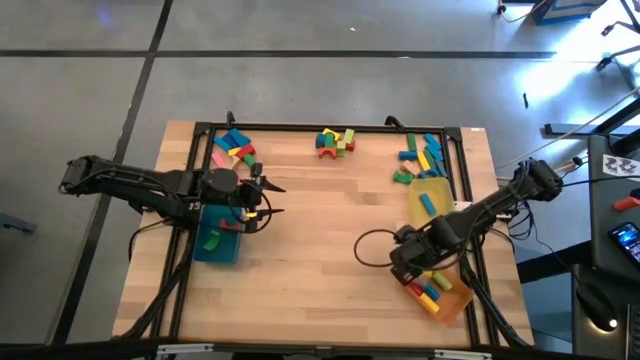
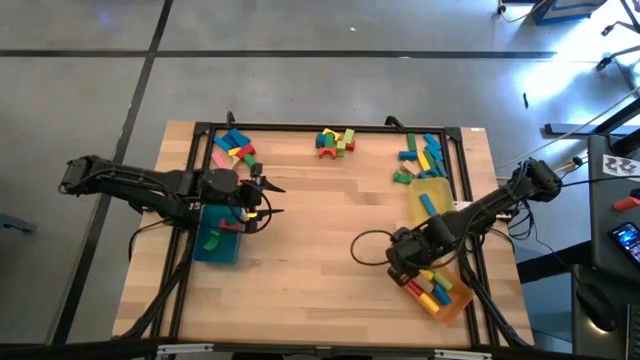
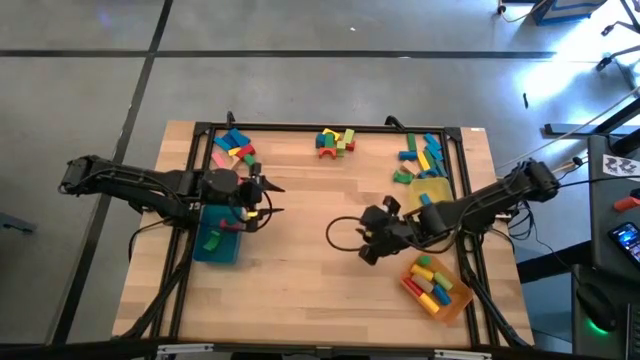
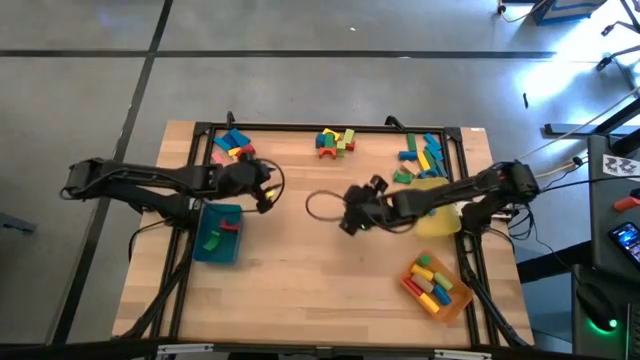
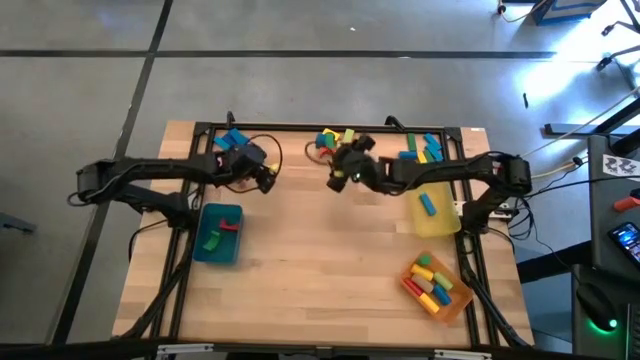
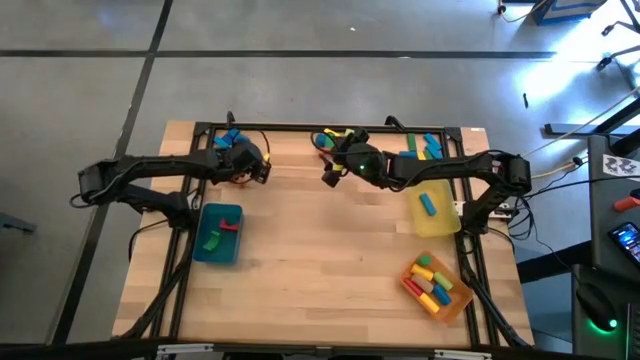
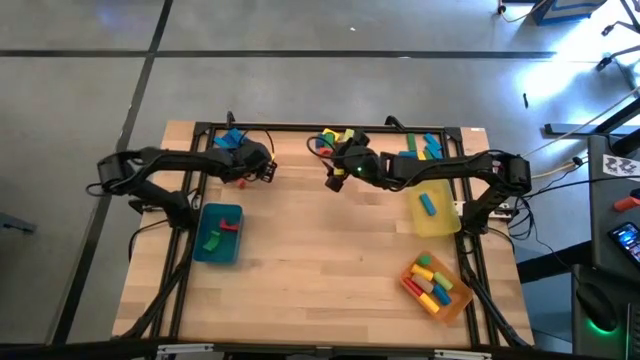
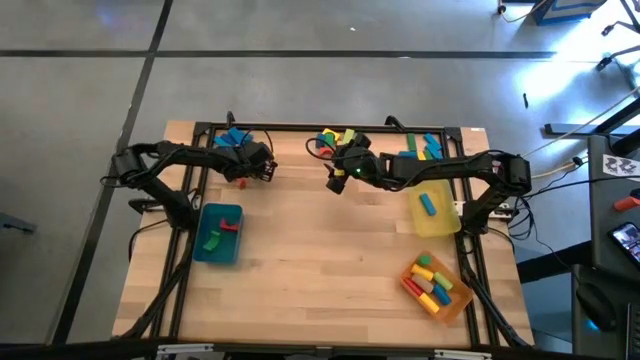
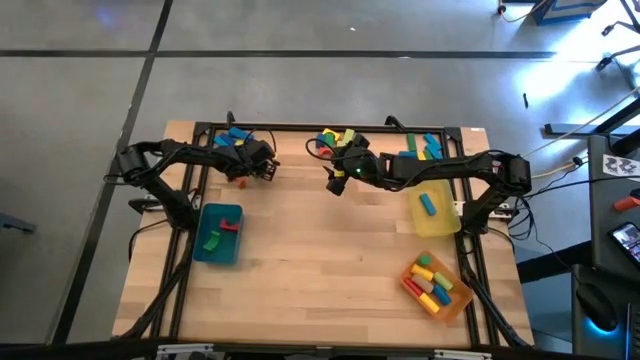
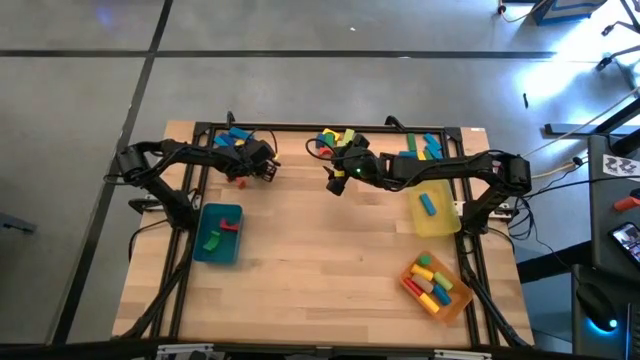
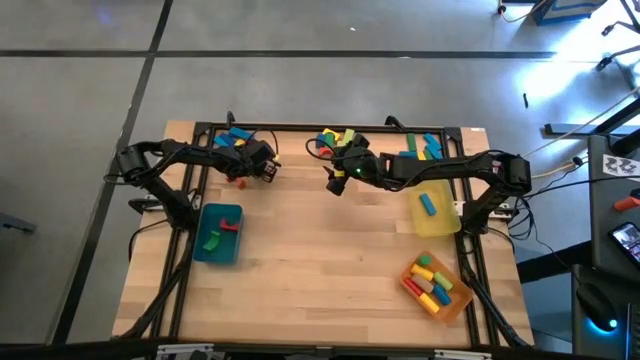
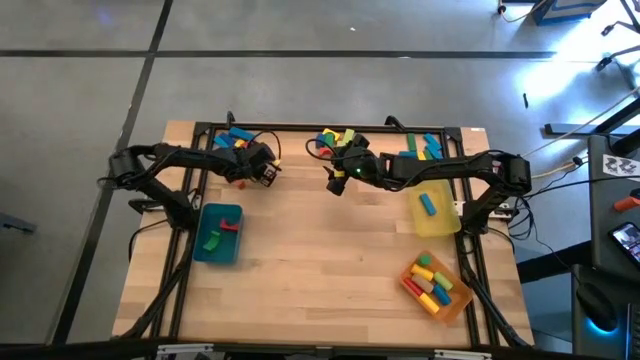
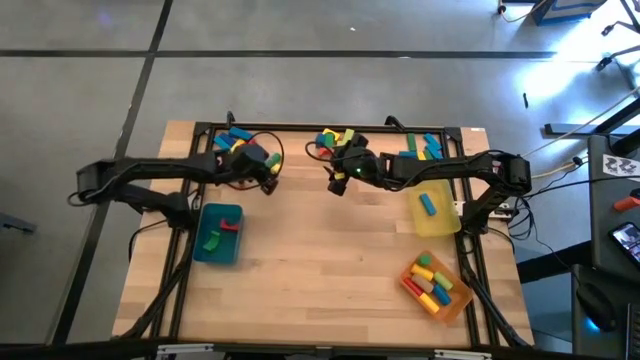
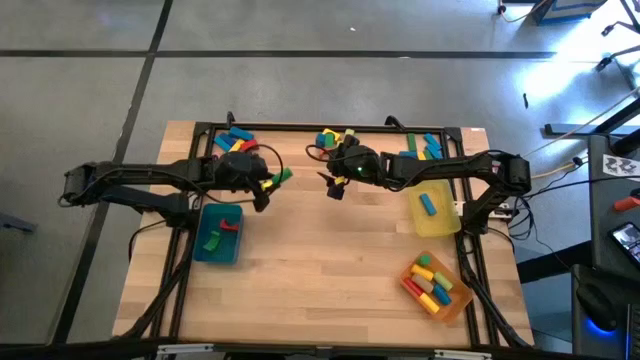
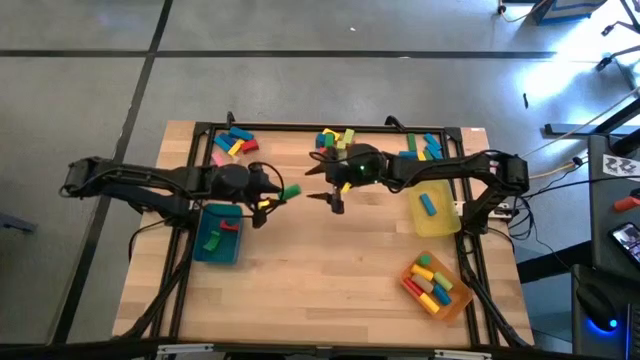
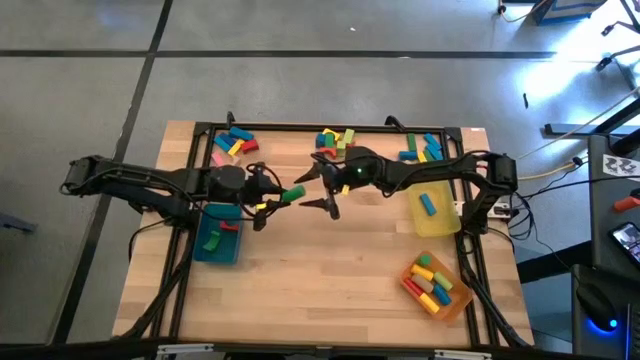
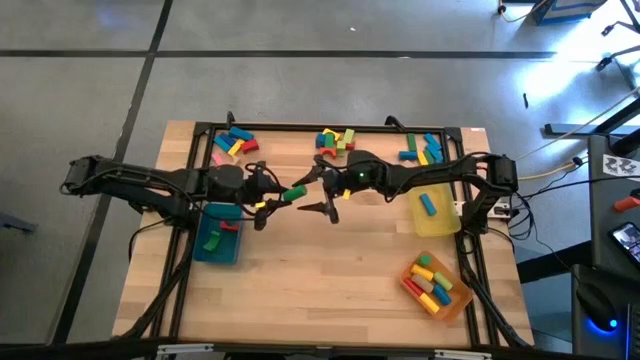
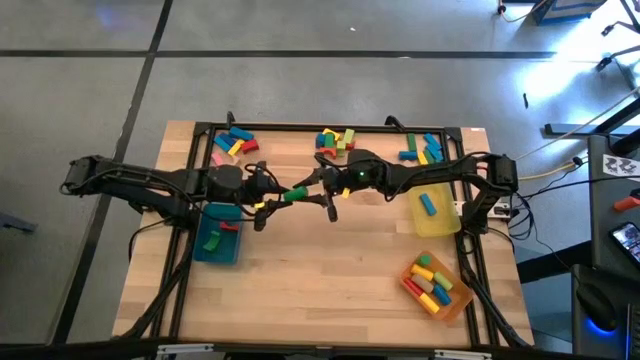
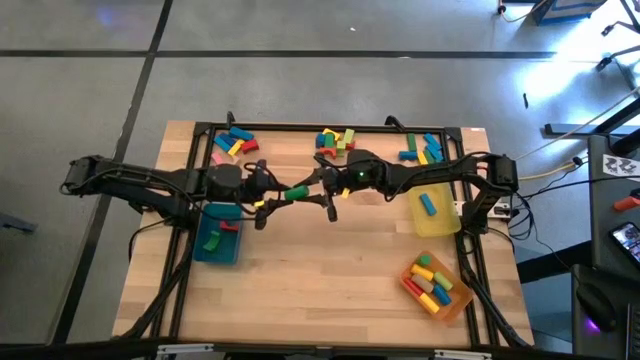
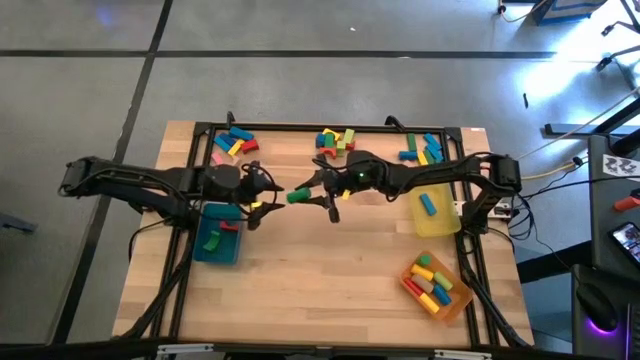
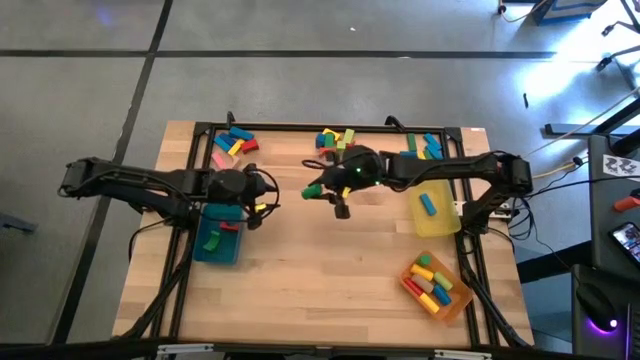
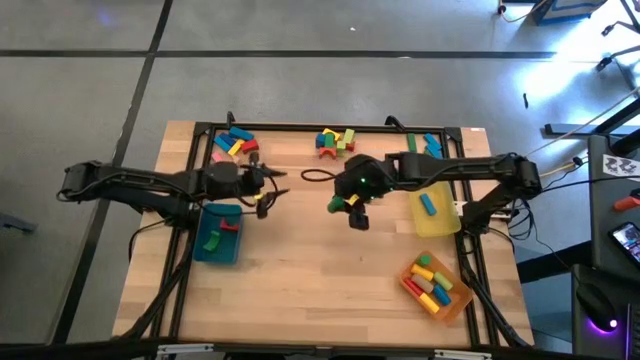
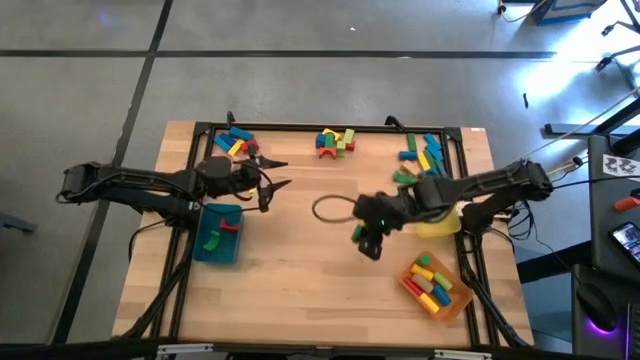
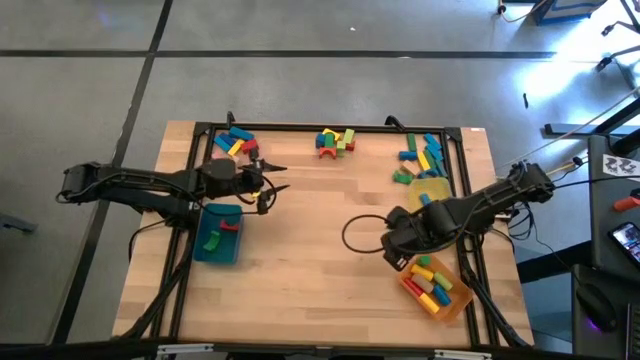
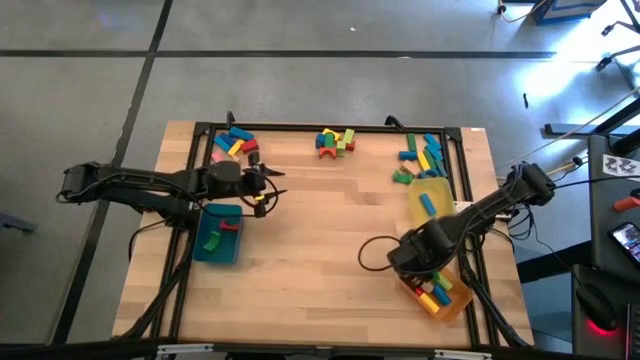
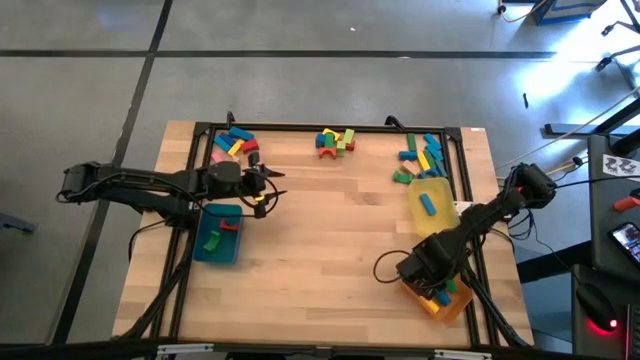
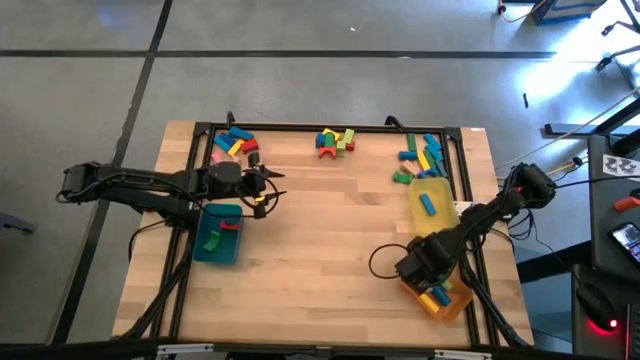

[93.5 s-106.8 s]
Task: Sort blocks by size
Put the green cylindrical block into the orange bin

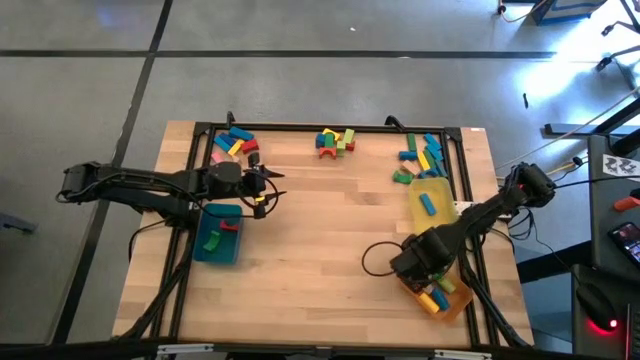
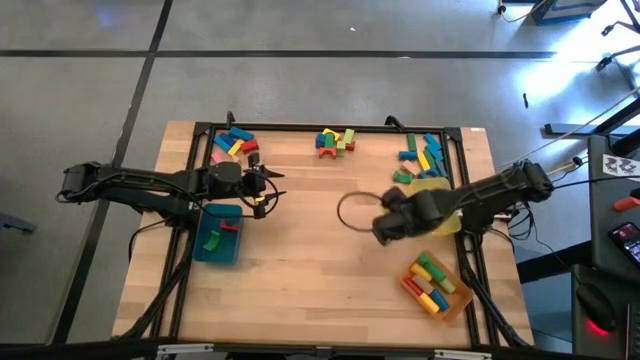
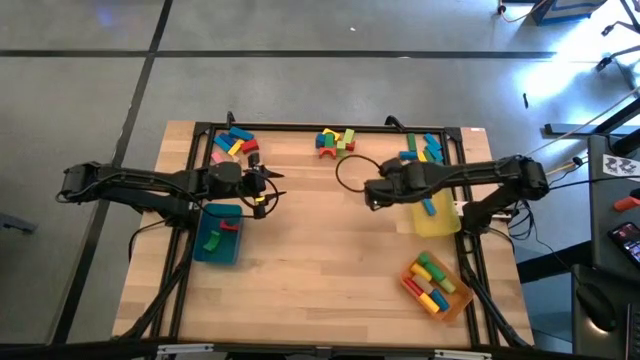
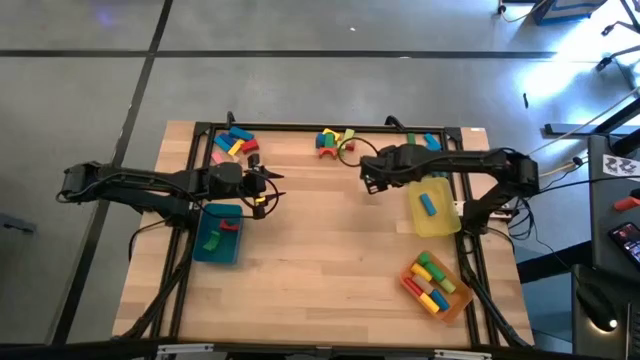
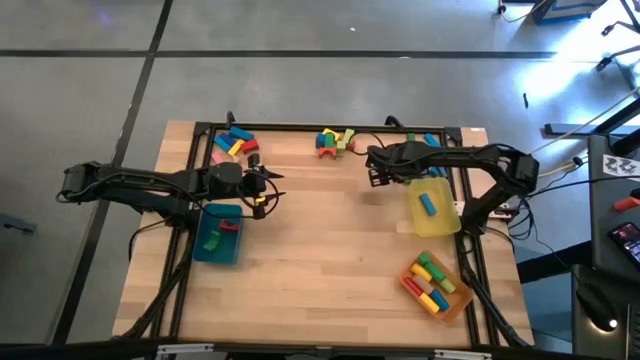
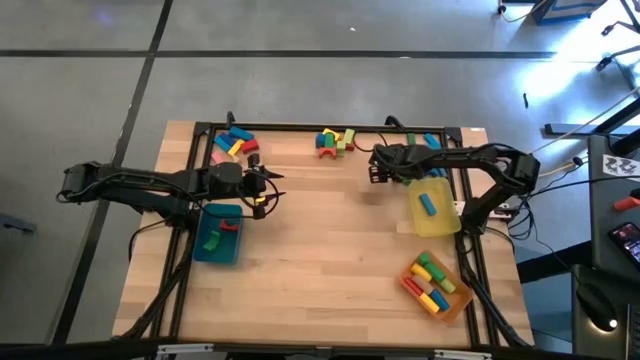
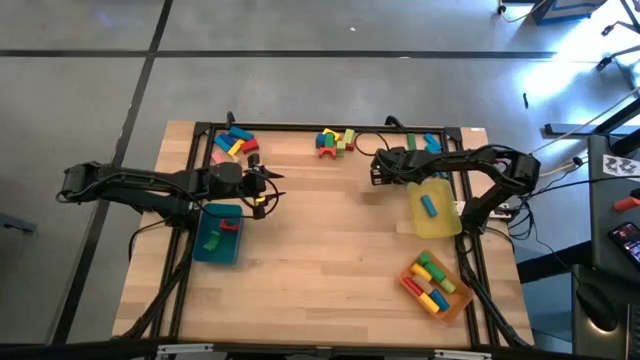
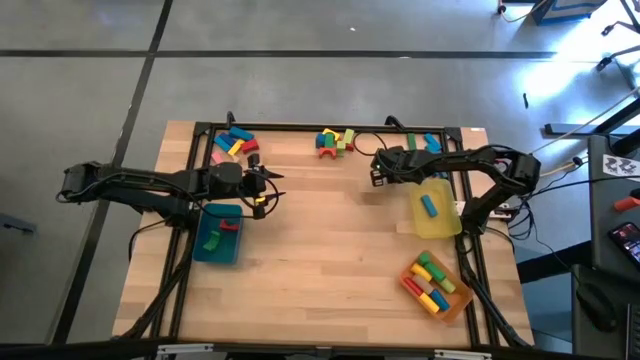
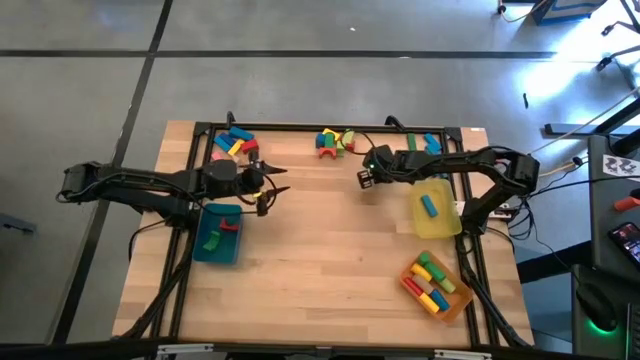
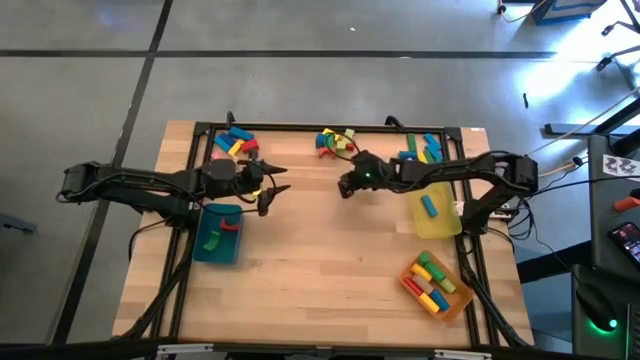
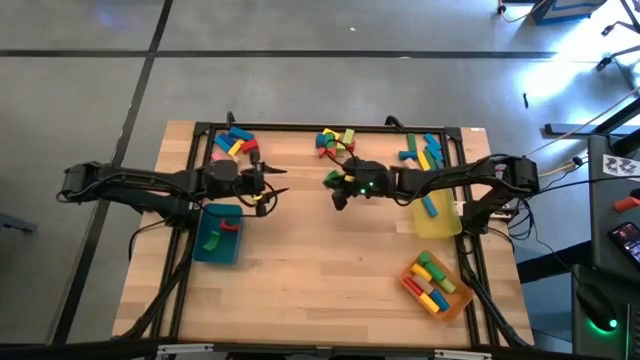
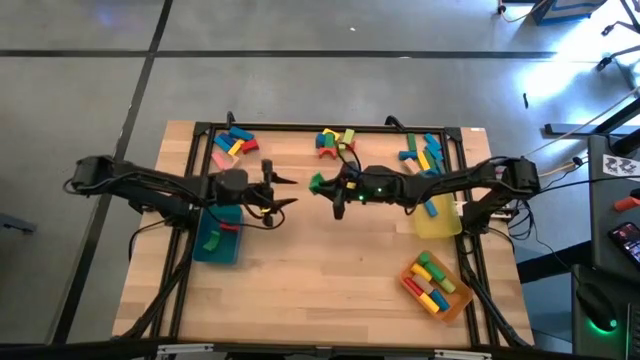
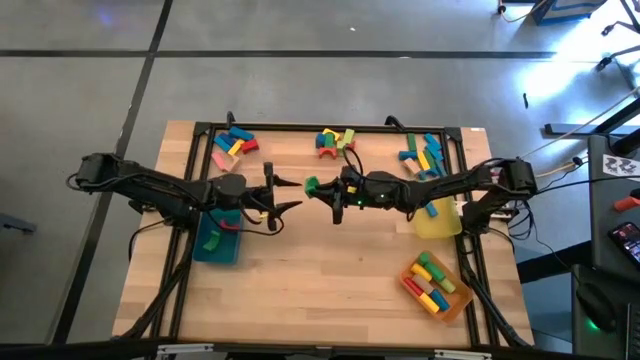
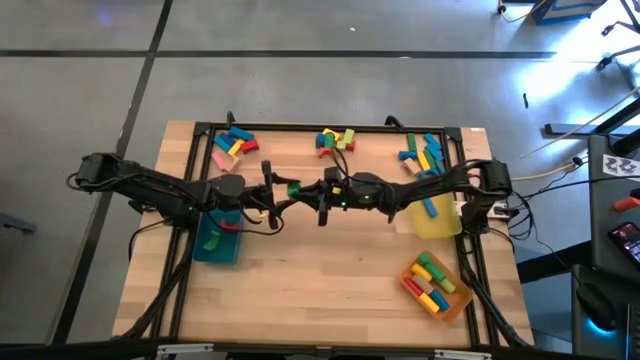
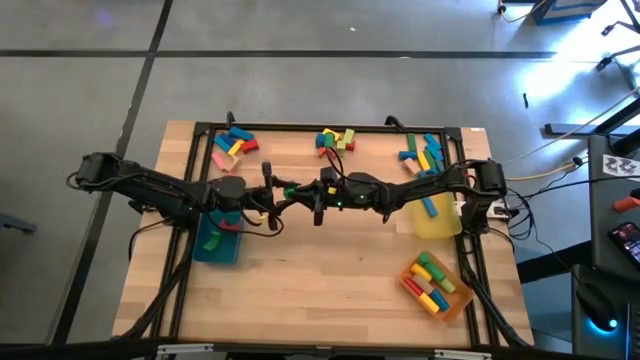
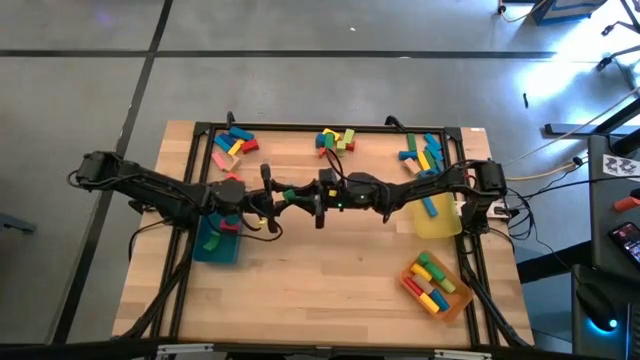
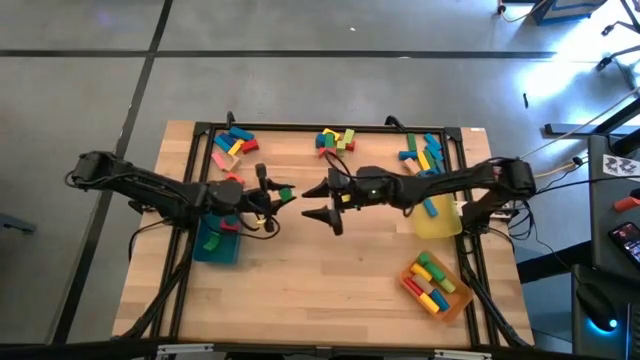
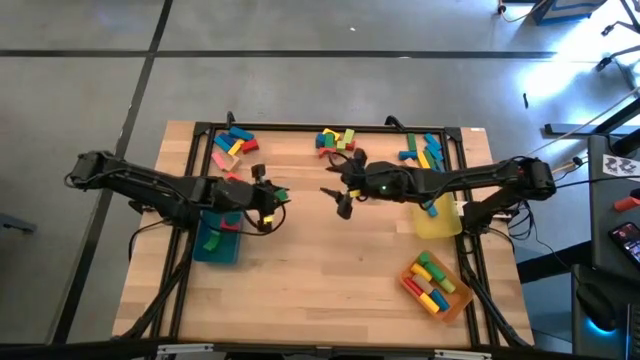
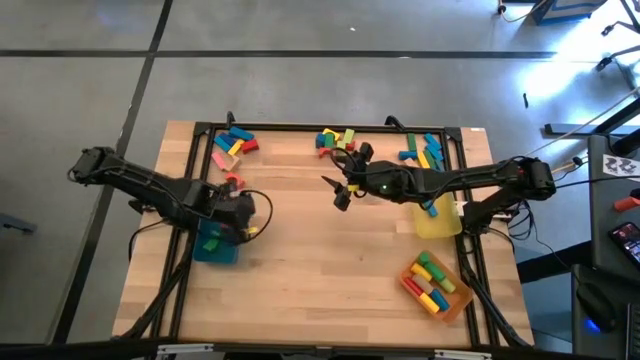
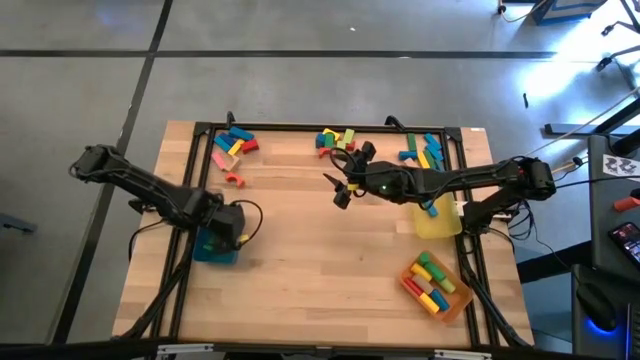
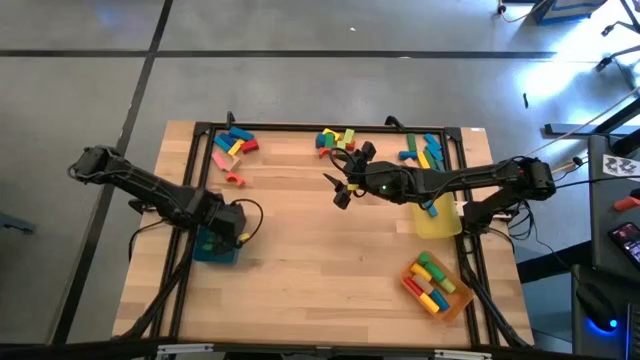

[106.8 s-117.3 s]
Put the green arch block into the blue bin
